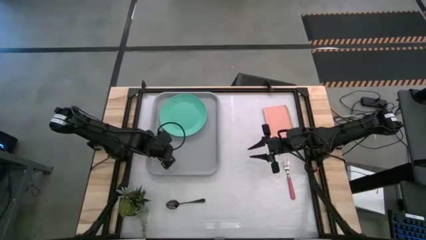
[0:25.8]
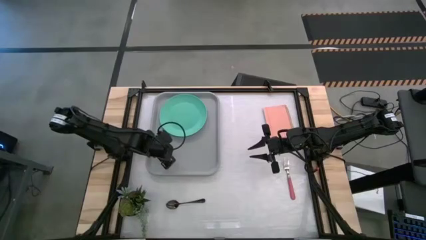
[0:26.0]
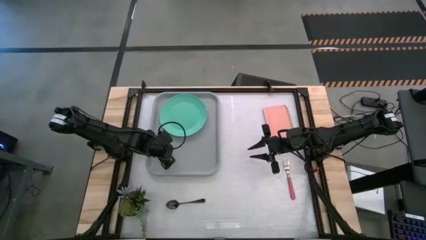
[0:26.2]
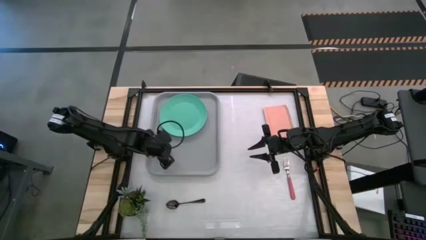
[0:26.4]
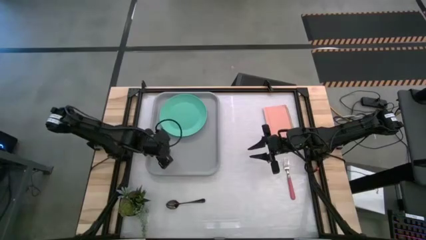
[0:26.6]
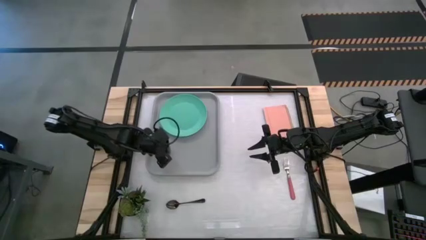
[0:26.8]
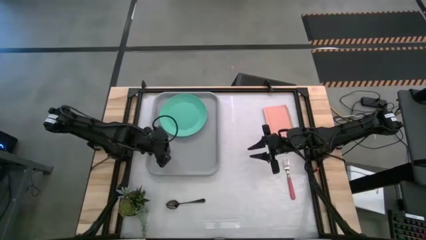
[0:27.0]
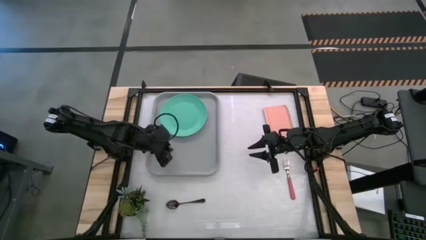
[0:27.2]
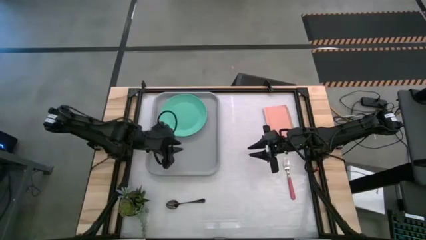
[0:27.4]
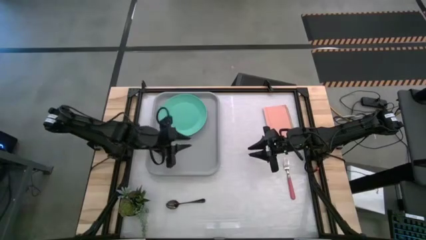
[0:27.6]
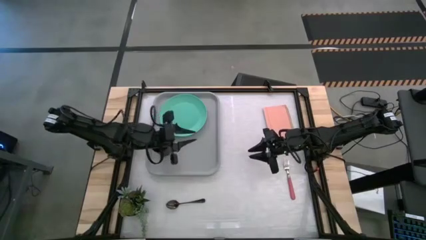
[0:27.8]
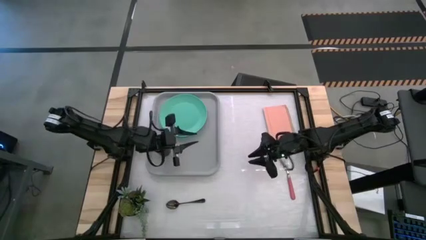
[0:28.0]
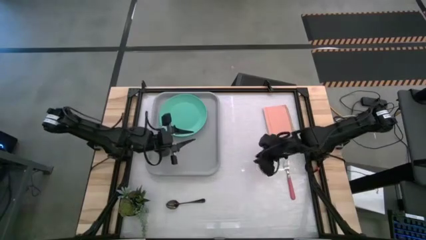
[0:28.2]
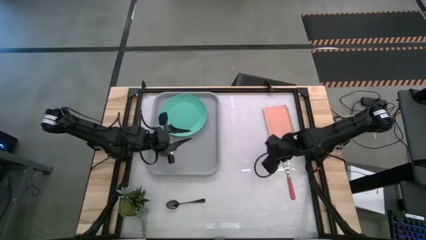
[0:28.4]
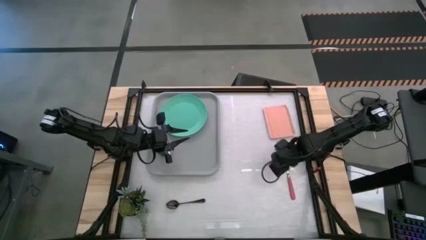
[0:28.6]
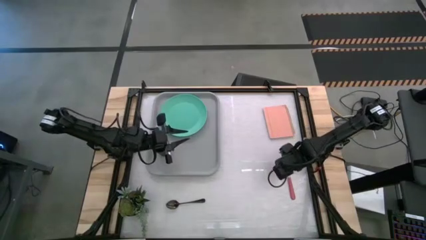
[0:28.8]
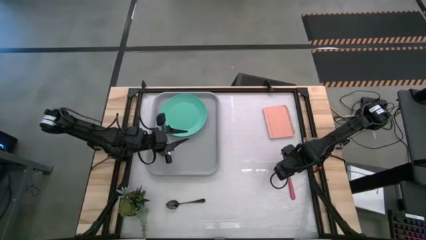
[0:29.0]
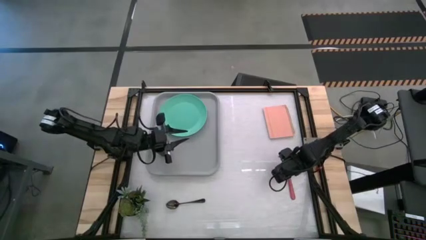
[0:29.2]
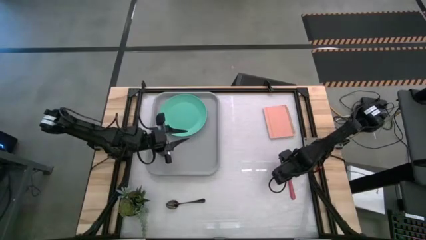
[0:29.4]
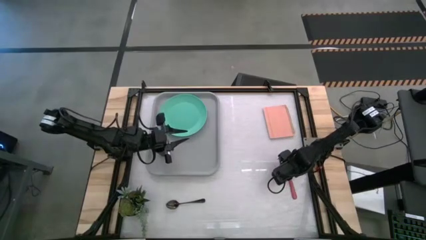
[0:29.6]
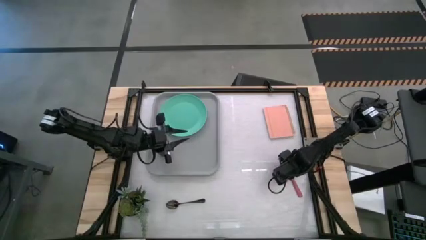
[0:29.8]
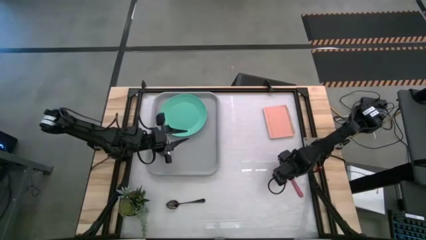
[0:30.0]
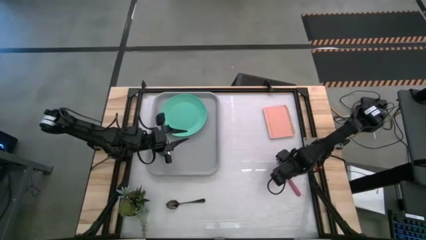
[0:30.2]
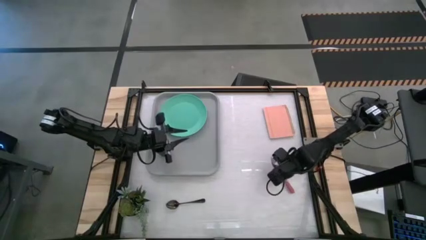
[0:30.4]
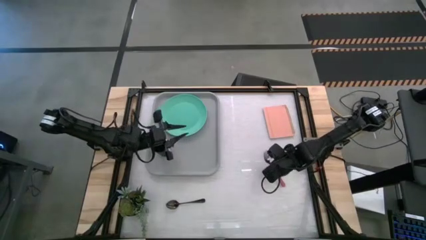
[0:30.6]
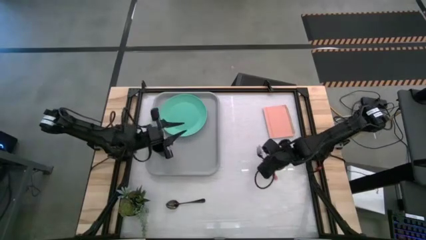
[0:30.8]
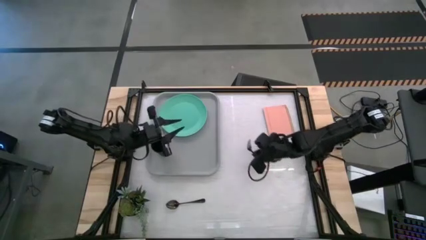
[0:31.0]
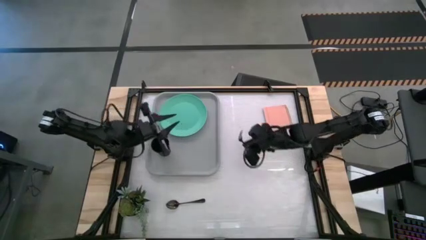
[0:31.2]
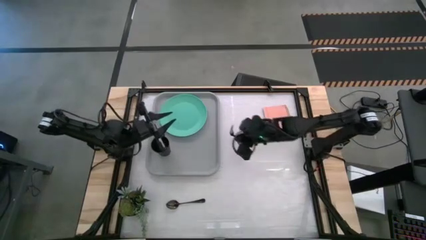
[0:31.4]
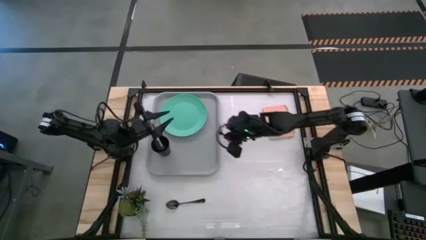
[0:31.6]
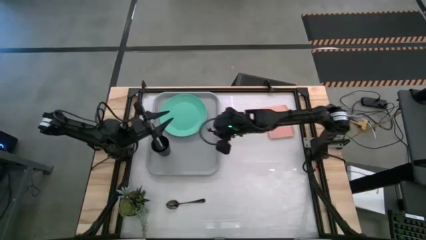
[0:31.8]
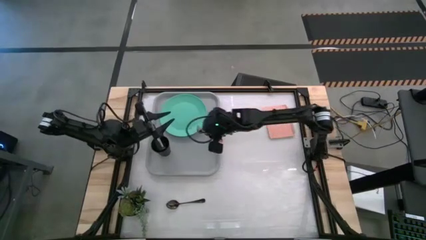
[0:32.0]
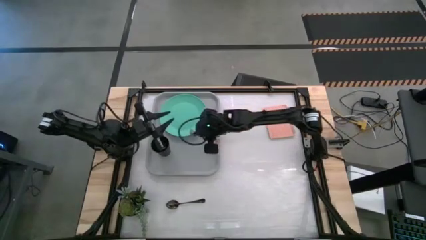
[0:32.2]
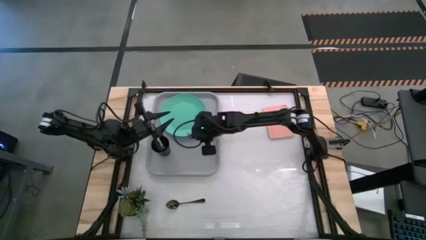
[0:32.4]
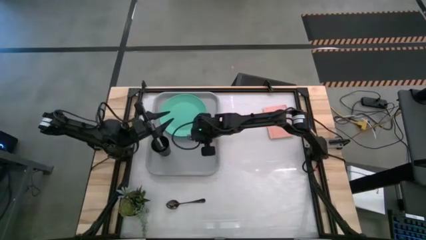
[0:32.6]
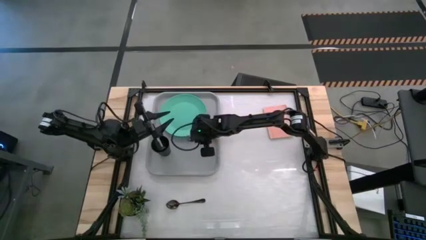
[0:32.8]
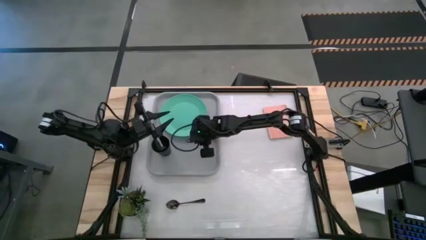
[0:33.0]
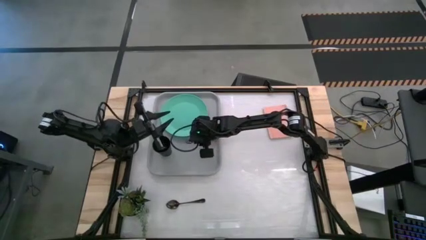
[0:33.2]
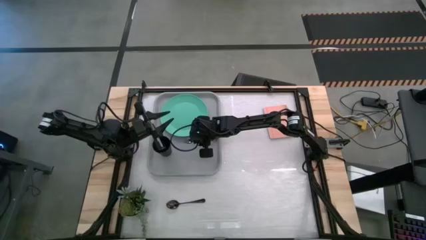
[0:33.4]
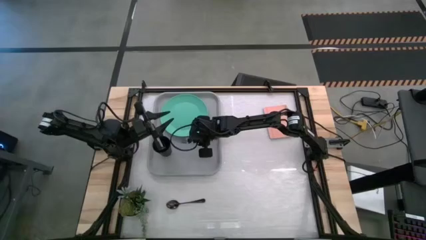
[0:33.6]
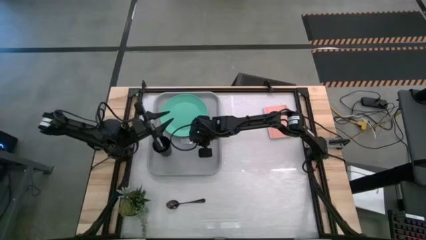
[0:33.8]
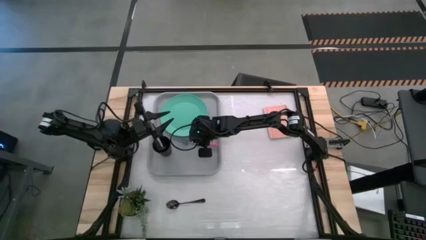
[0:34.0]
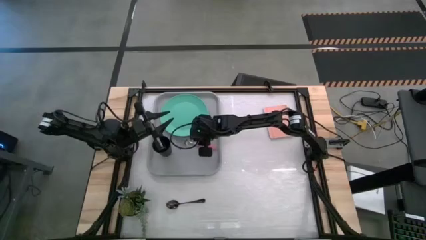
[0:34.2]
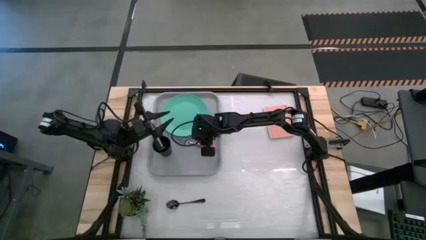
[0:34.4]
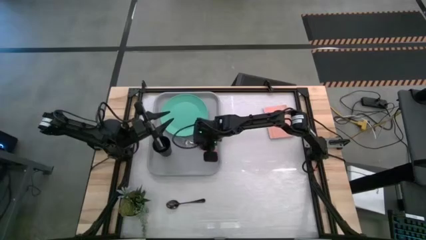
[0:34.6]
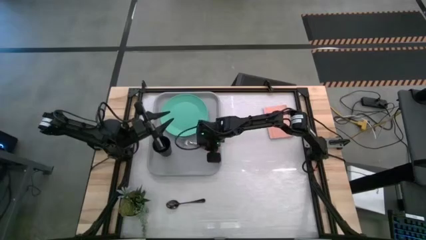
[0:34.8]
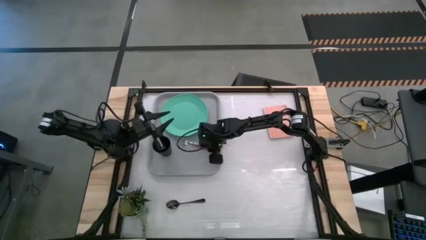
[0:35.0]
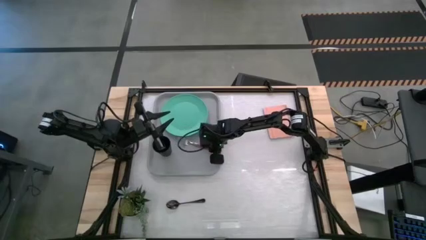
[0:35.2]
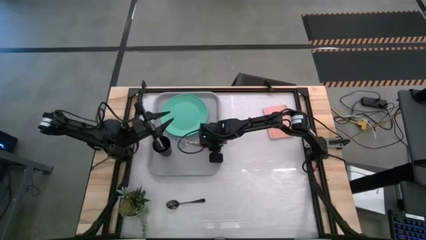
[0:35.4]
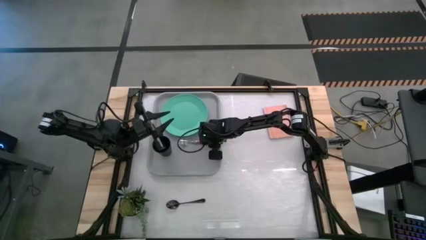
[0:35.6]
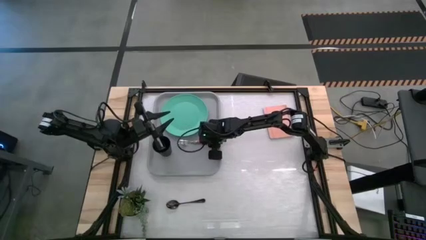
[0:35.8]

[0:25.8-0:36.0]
Task: Pick and place plate/cup/fork/spoon on tray
Put the pink fork to the bottom right of the light green plate on the gray serving tray

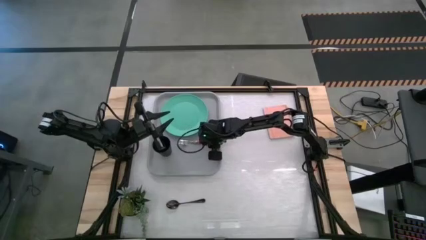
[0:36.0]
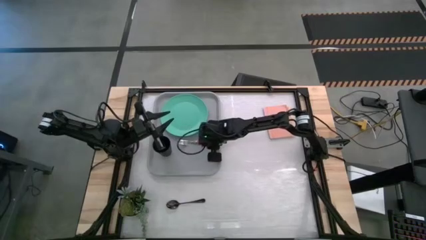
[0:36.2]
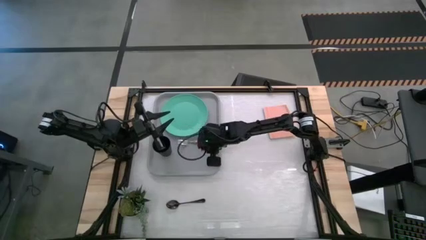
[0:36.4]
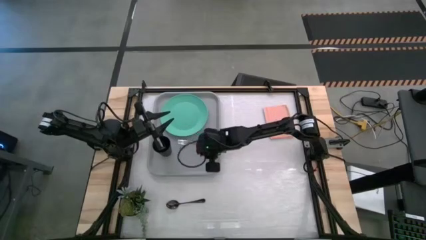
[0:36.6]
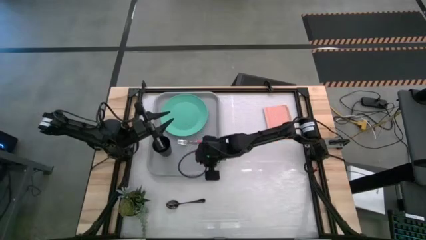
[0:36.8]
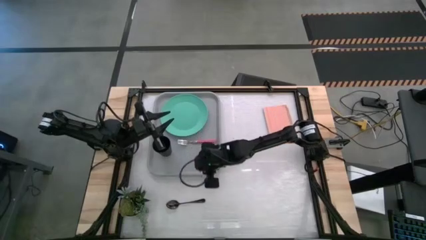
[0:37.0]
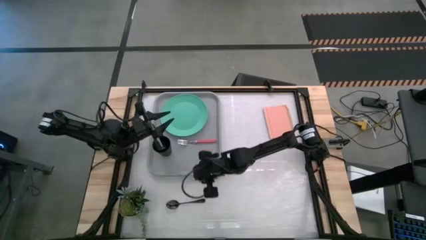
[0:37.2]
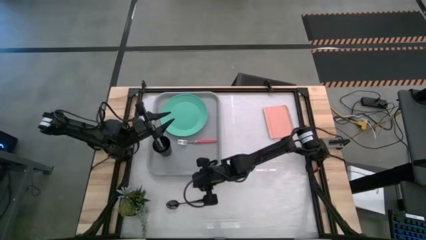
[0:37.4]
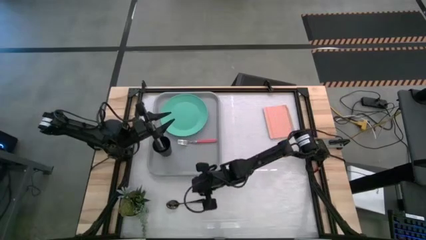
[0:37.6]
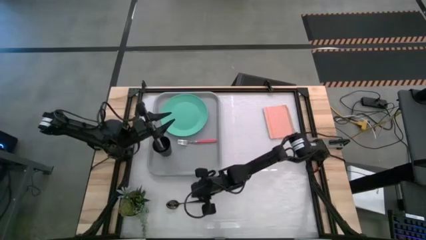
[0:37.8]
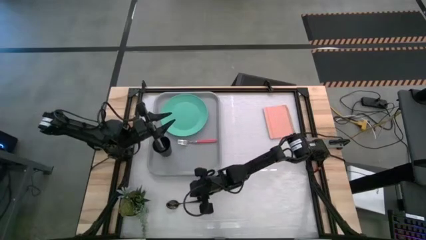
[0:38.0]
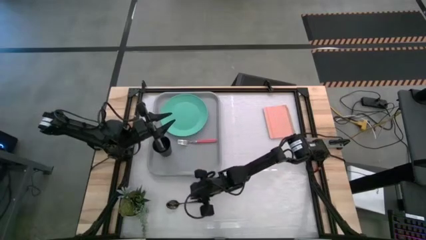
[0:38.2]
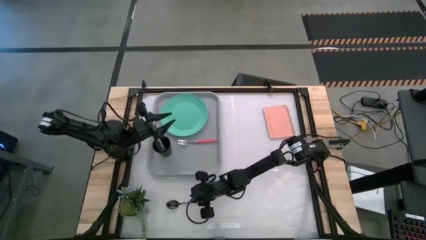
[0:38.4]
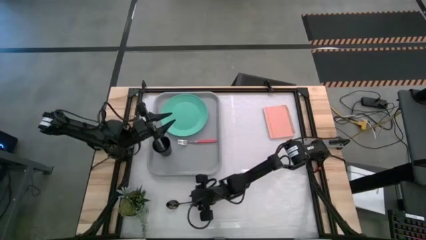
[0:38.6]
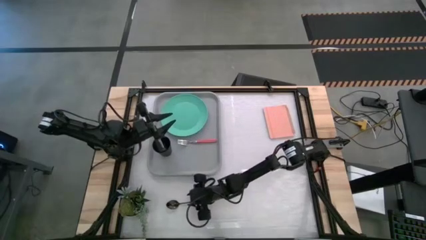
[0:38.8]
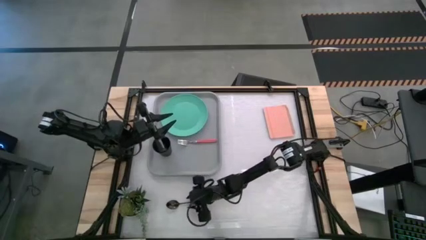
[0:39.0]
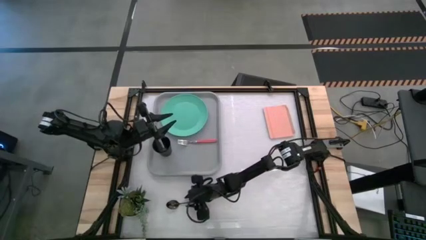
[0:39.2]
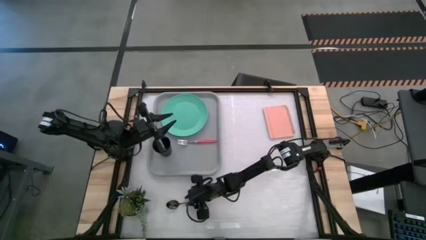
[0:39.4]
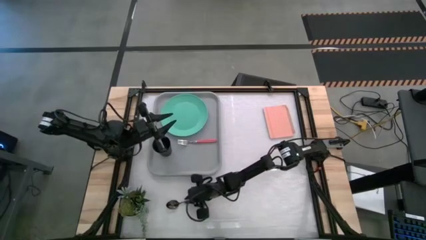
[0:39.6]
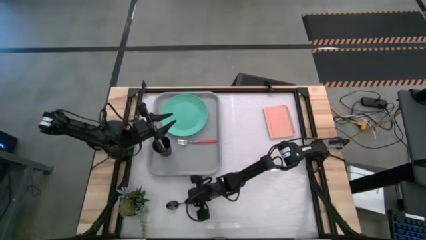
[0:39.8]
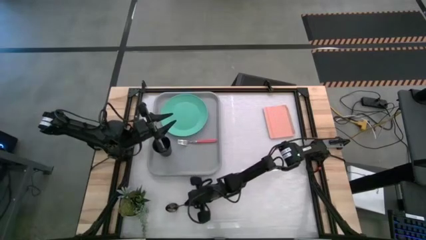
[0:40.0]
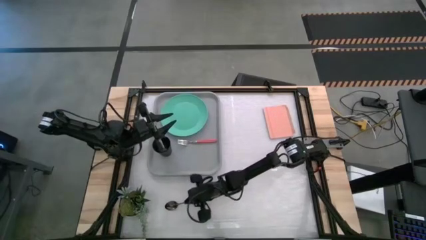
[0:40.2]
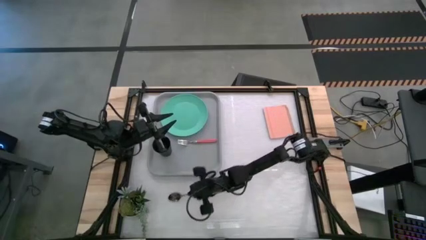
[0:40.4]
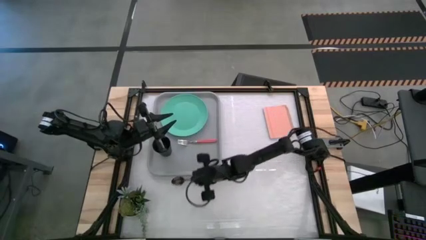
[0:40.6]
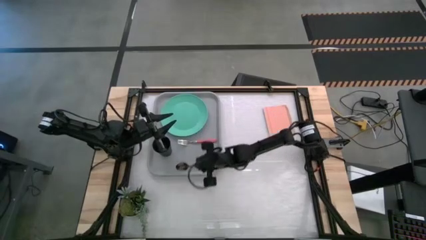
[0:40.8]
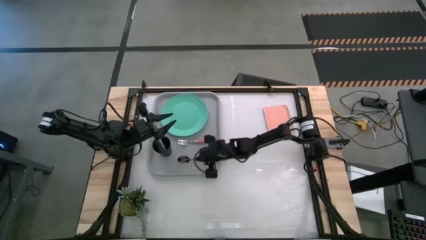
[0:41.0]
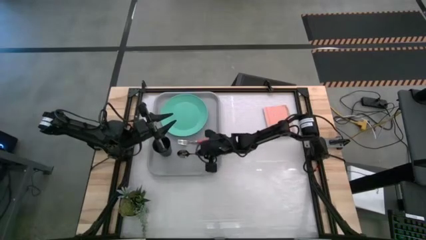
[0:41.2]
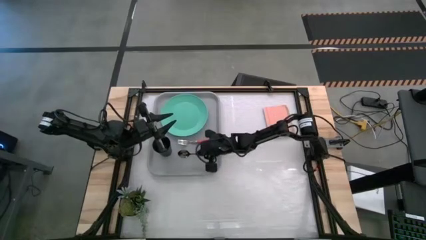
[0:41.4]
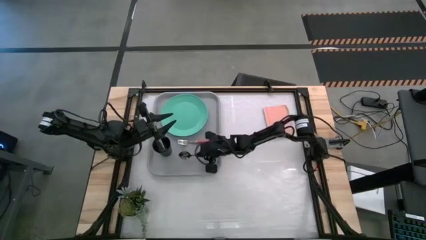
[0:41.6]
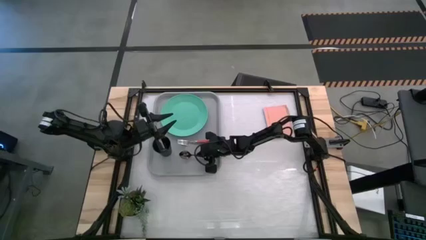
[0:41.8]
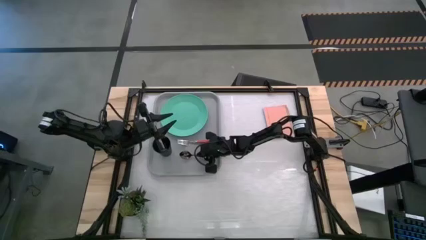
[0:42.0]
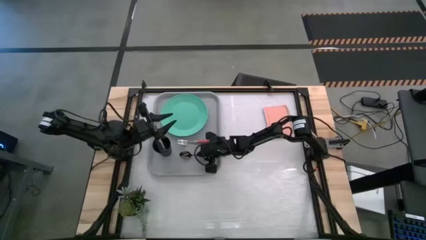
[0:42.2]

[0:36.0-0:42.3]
Put the black spoon to the bottom of the pink fork on the gray serving tray

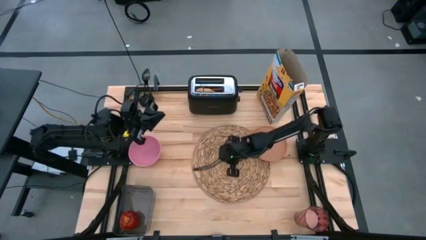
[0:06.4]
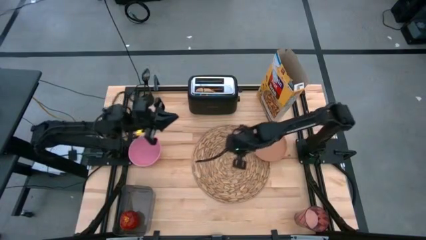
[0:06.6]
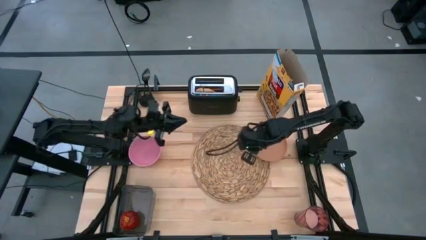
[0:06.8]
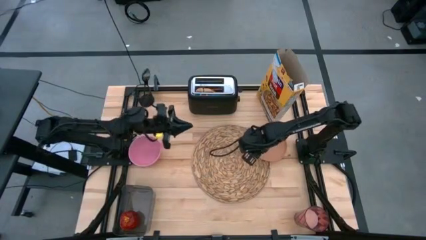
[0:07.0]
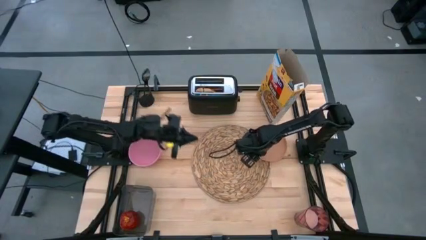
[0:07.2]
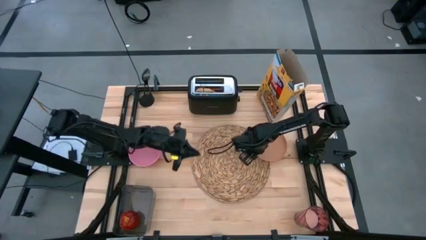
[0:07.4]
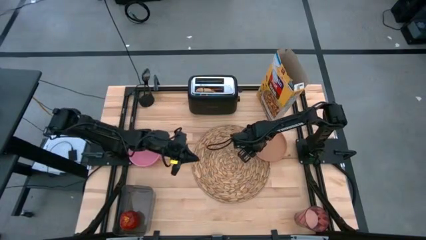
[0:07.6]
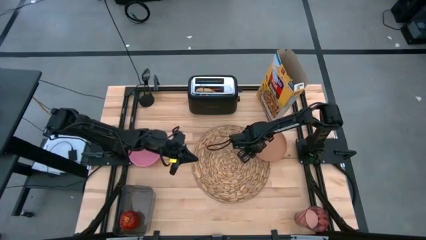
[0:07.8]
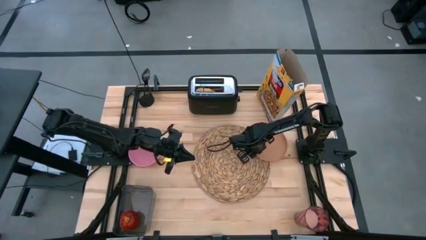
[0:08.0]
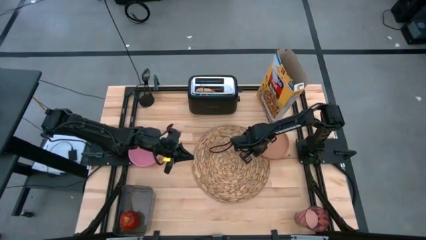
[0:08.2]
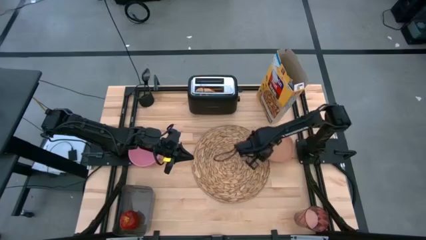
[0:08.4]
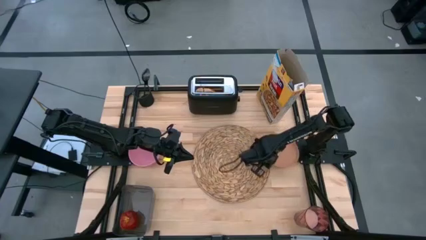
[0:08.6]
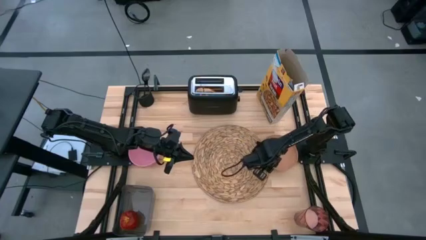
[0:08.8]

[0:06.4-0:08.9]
Task: Arrange a breakfast setting
Move the plate to the right side of the table
